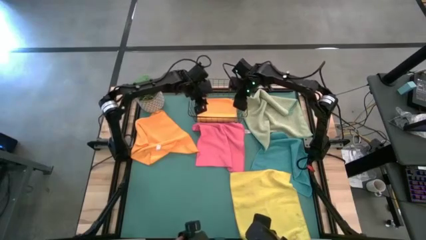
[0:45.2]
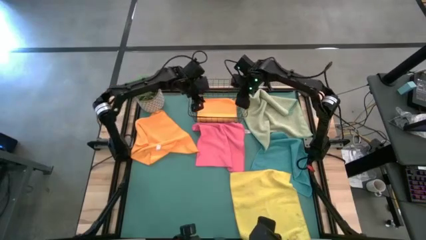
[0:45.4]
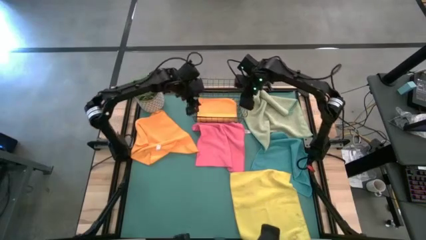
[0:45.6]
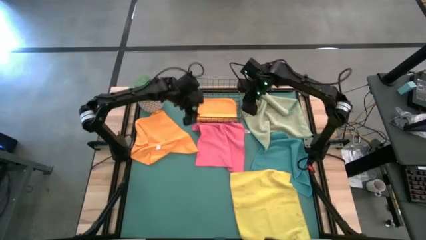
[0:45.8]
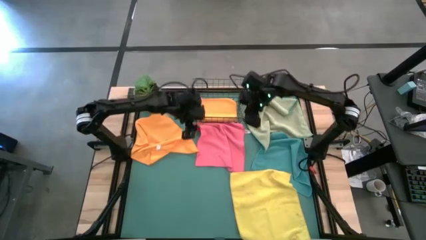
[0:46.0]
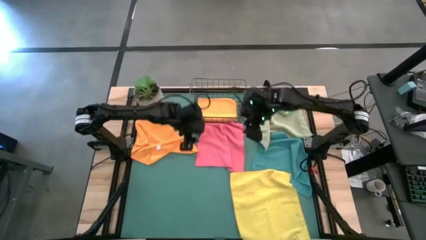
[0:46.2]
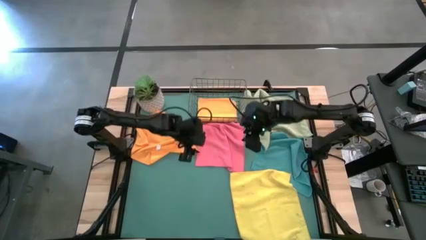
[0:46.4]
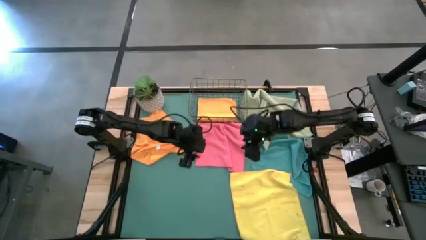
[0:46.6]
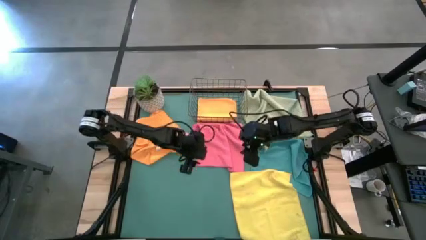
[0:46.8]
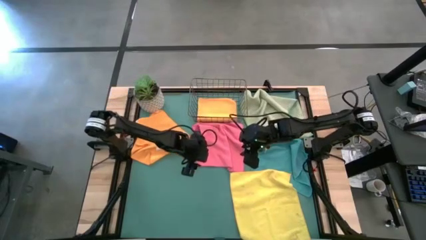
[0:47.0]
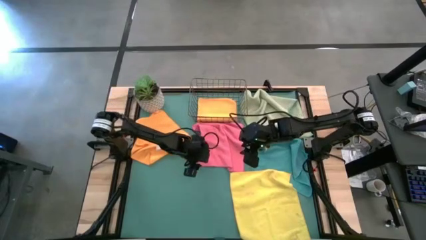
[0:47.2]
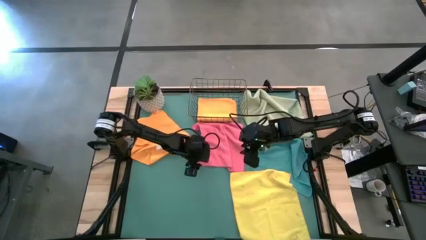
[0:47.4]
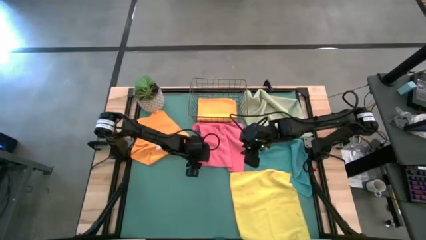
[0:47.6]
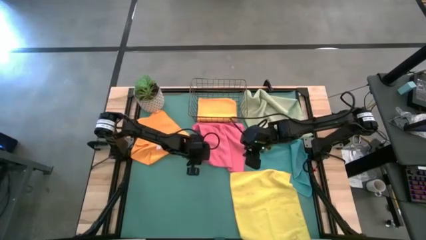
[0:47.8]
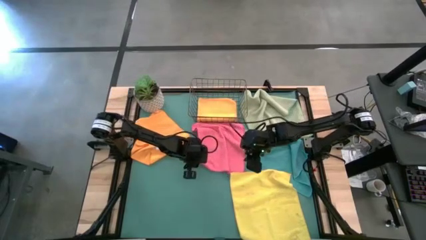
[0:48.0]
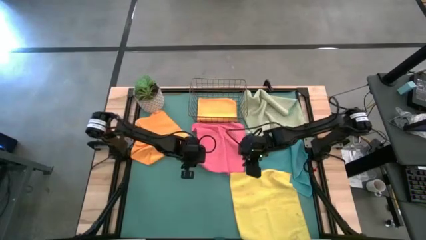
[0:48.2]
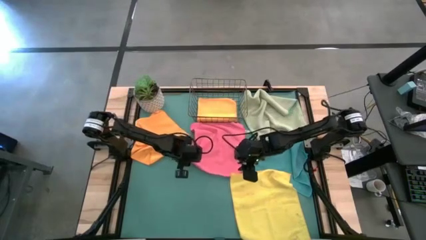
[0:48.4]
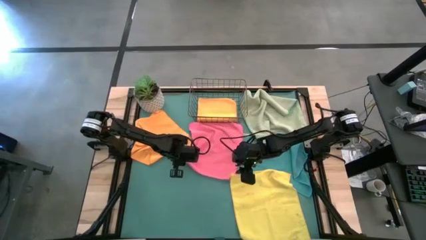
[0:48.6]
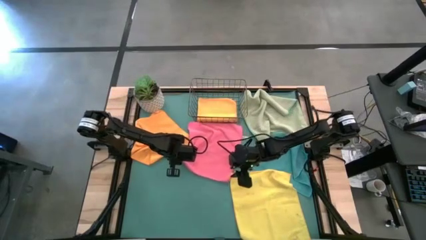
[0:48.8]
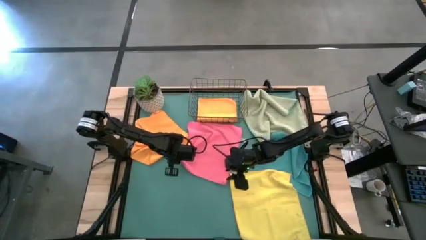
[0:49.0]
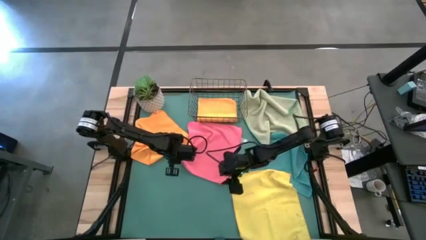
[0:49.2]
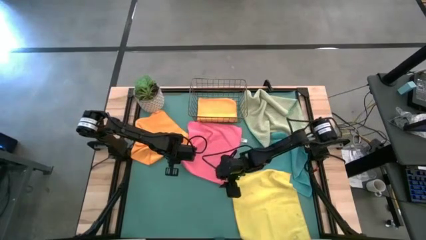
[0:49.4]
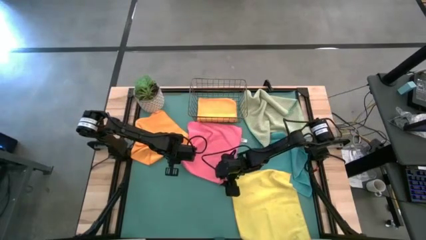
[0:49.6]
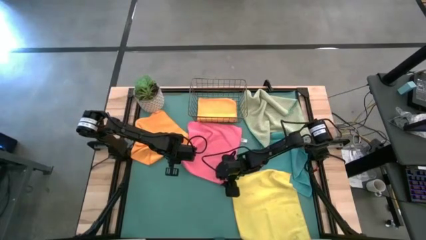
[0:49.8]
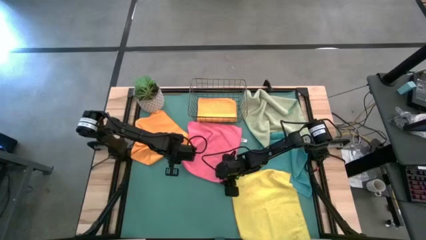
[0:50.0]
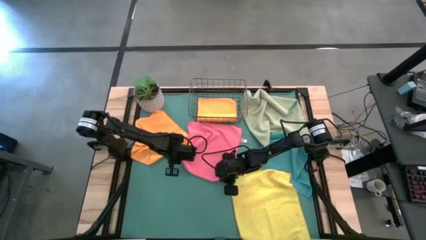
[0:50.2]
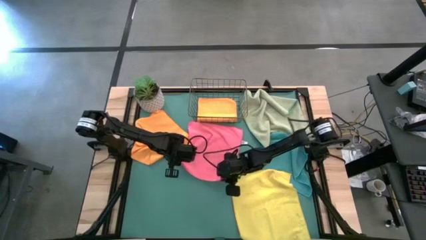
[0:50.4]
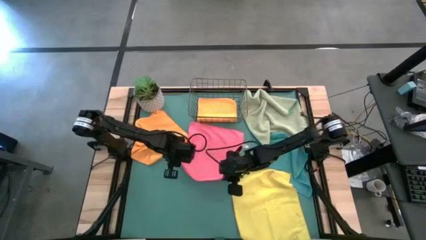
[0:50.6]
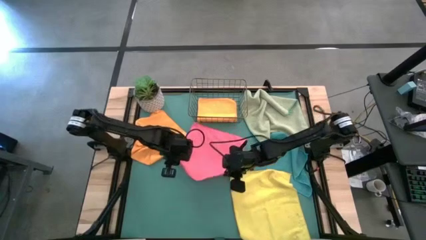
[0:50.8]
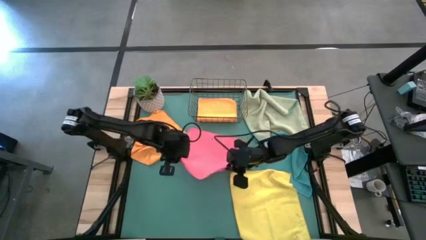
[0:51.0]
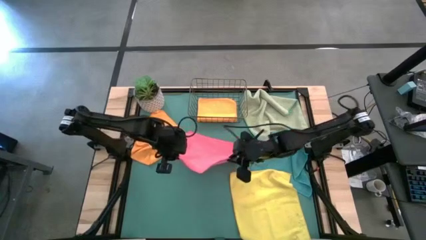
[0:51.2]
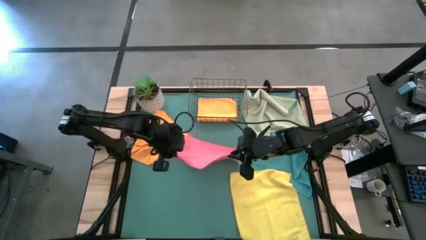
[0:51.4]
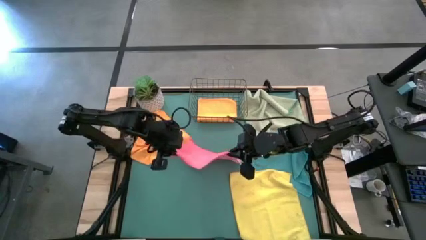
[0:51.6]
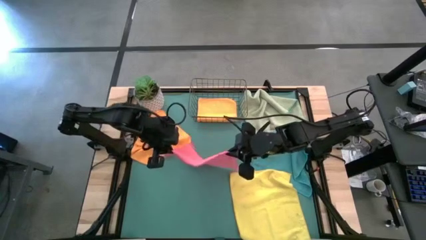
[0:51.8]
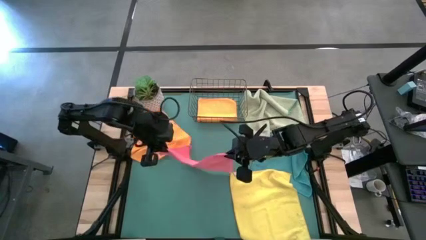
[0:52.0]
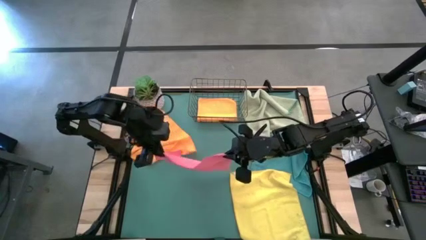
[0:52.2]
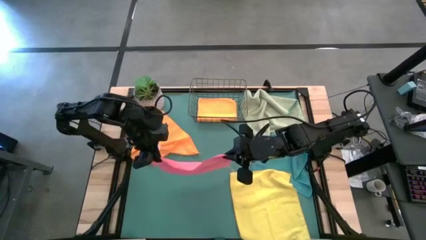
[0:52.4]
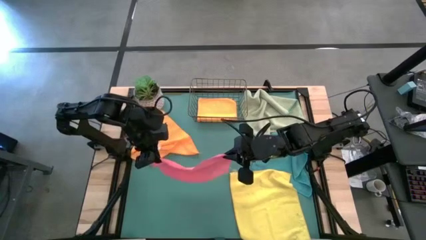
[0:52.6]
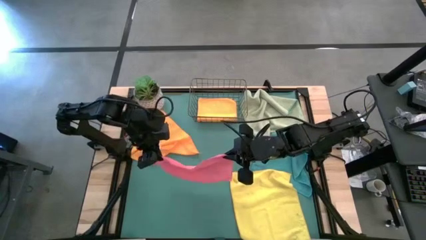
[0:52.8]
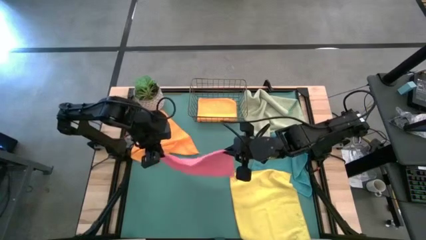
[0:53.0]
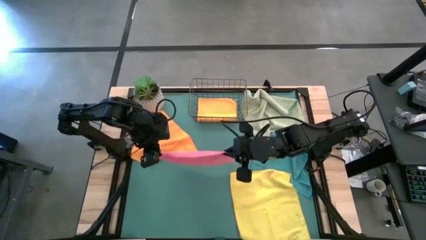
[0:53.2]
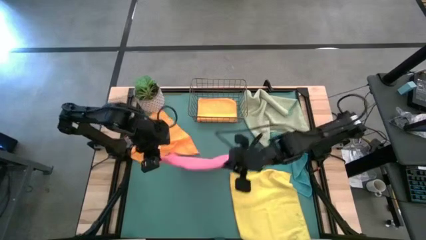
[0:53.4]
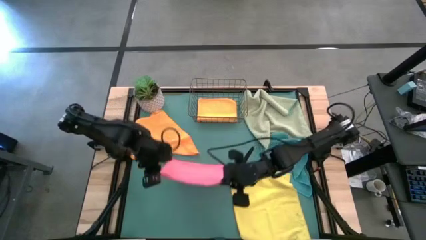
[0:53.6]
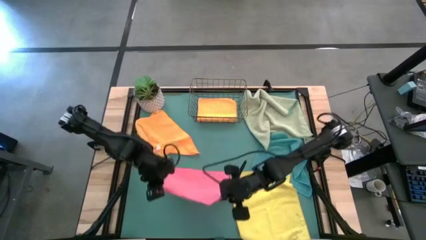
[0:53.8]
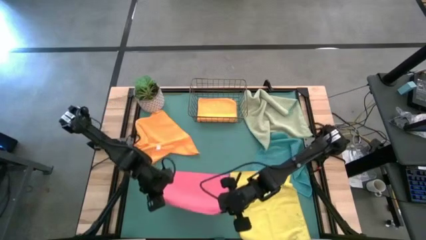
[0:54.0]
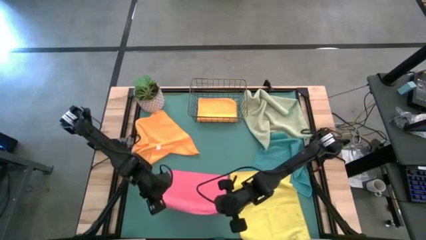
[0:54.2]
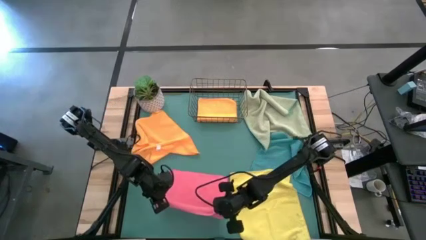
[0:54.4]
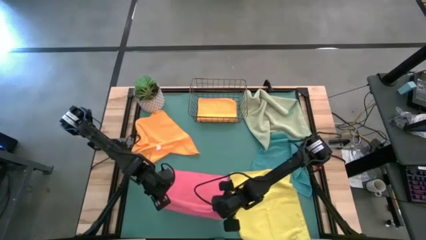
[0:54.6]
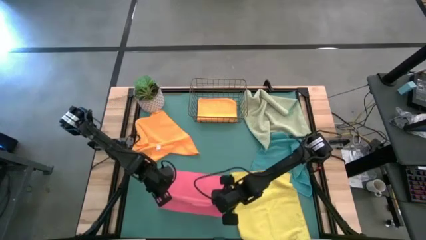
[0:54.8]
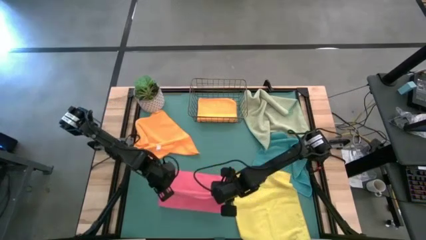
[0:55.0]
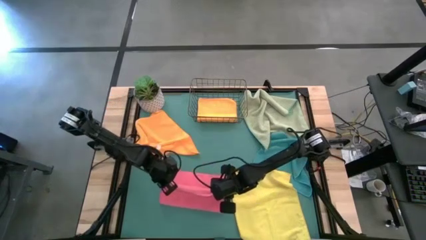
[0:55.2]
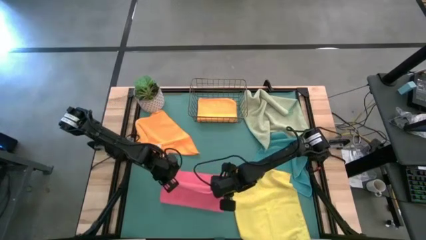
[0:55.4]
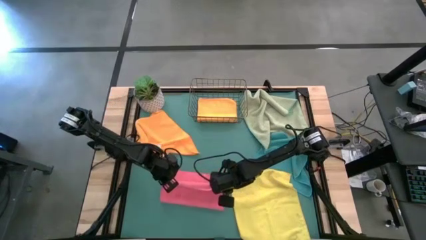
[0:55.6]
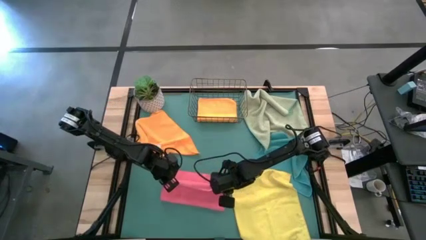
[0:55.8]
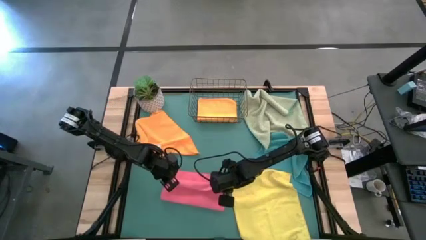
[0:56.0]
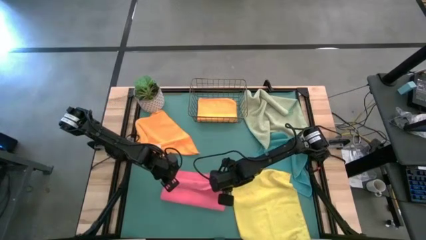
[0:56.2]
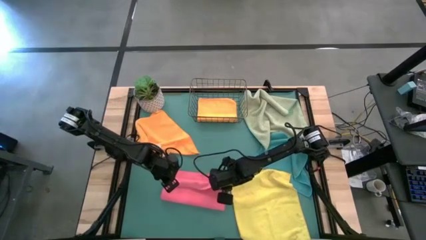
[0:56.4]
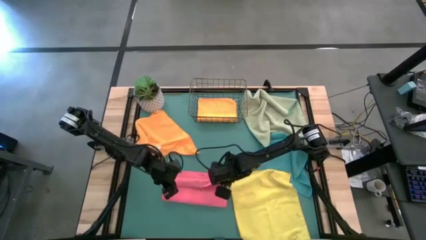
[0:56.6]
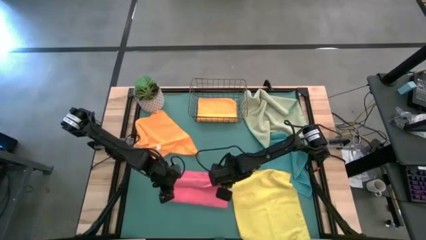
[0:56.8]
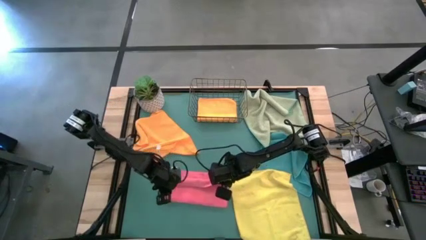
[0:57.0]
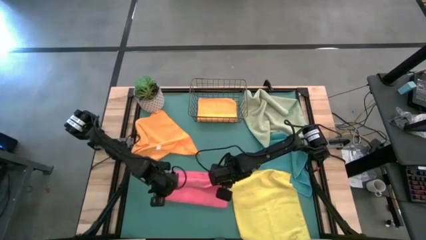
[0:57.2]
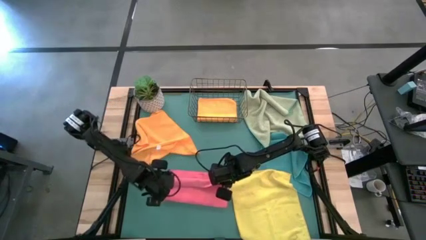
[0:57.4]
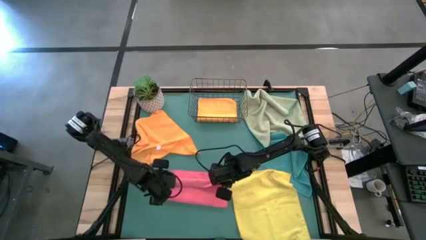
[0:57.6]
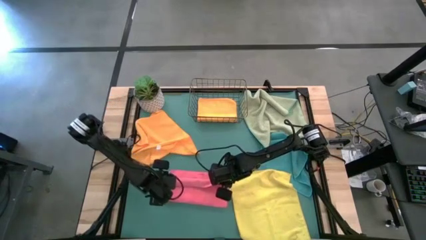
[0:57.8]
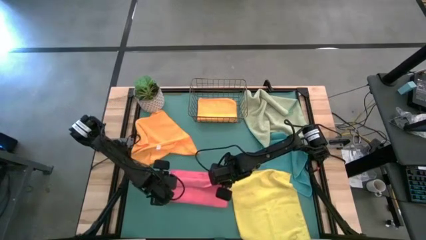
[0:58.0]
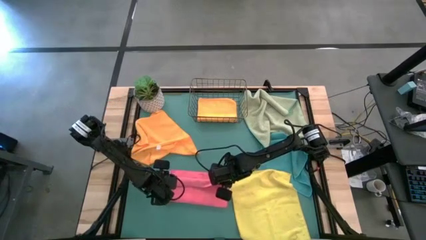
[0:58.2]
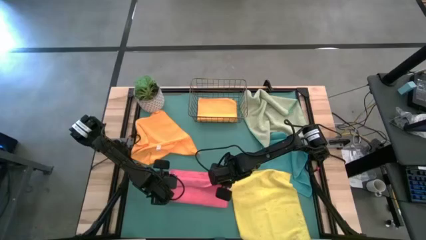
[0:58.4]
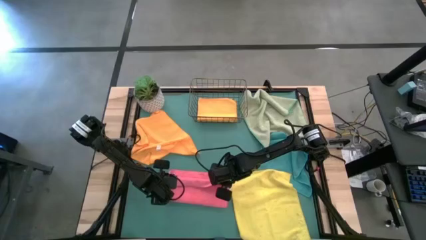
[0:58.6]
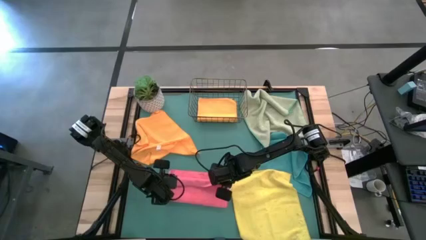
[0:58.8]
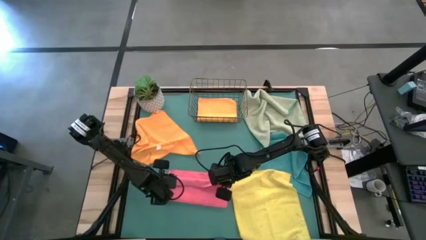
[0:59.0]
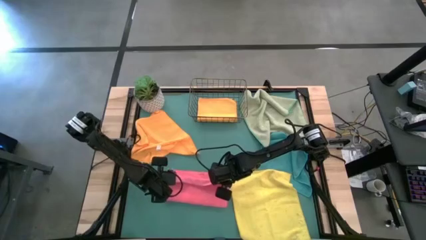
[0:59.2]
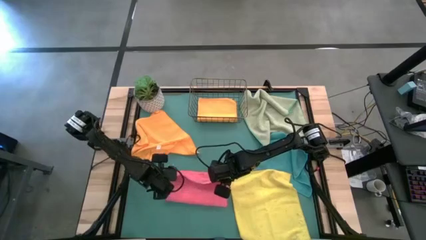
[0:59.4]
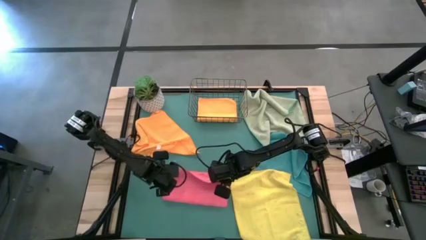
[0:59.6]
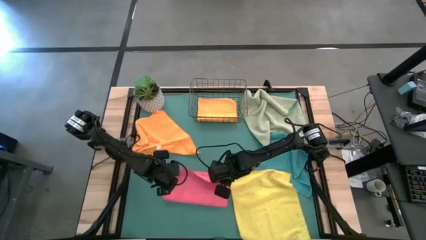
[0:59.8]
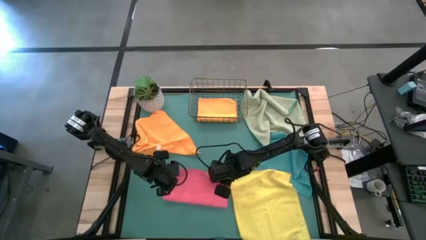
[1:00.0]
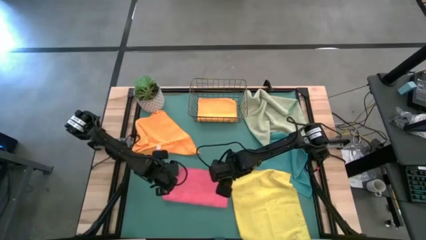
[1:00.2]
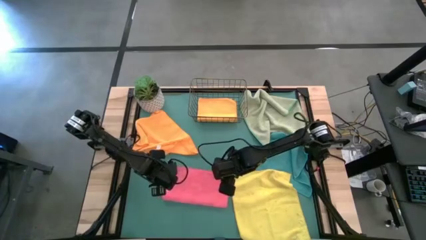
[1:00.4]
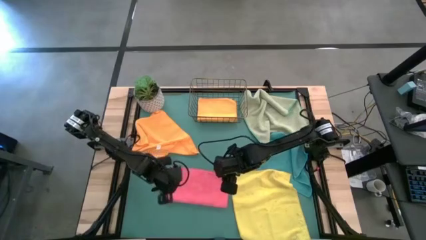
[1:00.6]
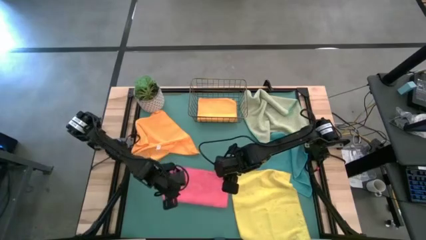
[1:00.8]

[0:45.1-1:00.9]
Task: Fold microfiber towels
Fold the pink microfiber towel
